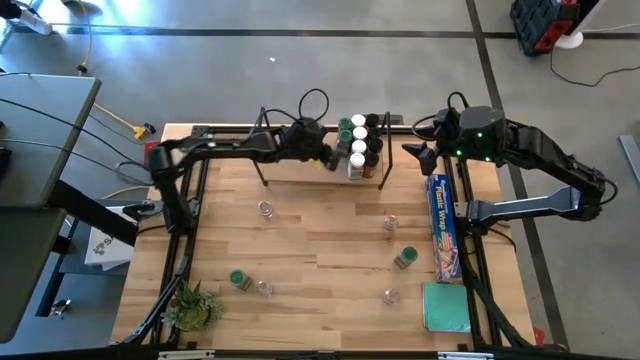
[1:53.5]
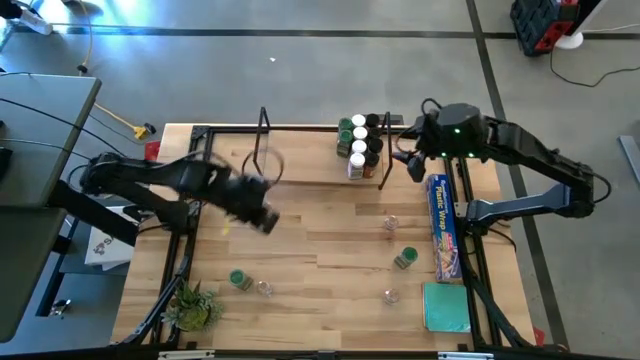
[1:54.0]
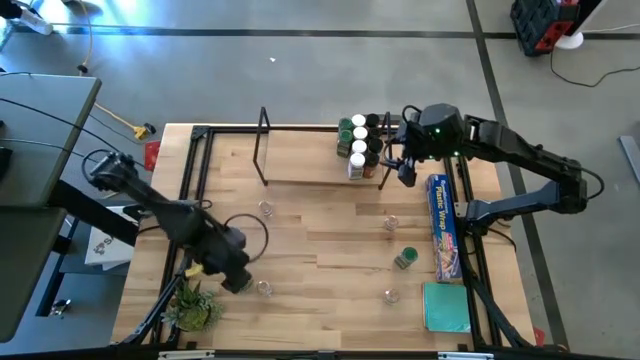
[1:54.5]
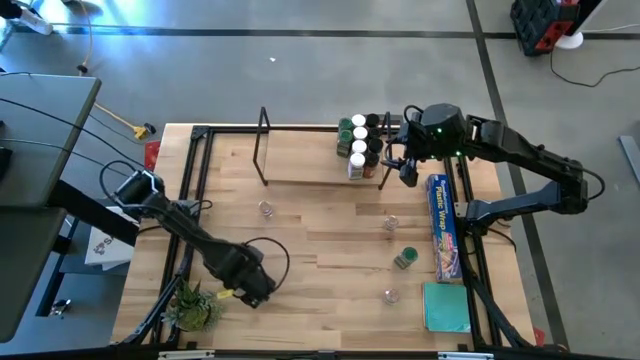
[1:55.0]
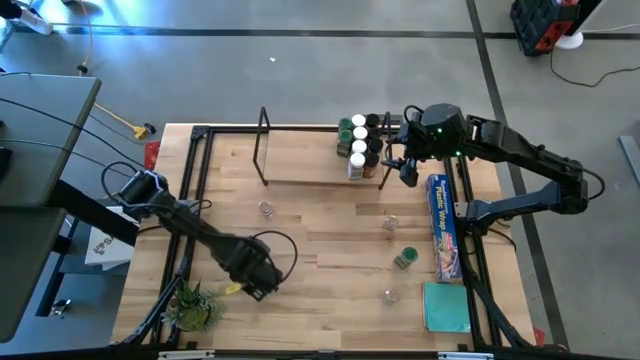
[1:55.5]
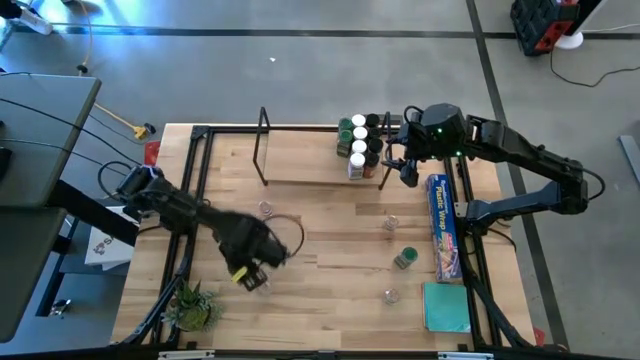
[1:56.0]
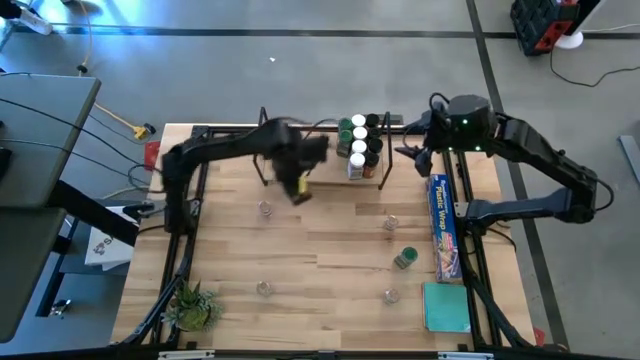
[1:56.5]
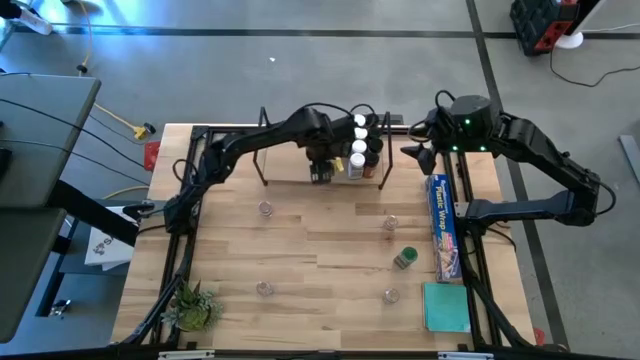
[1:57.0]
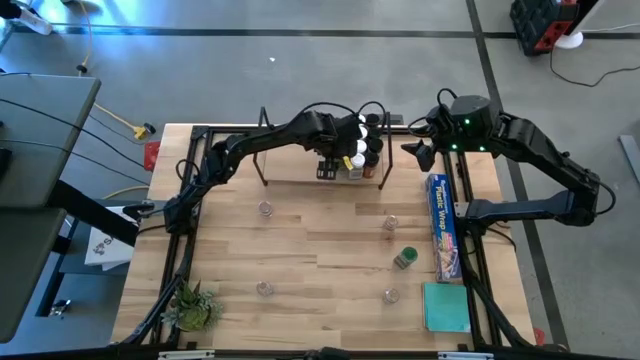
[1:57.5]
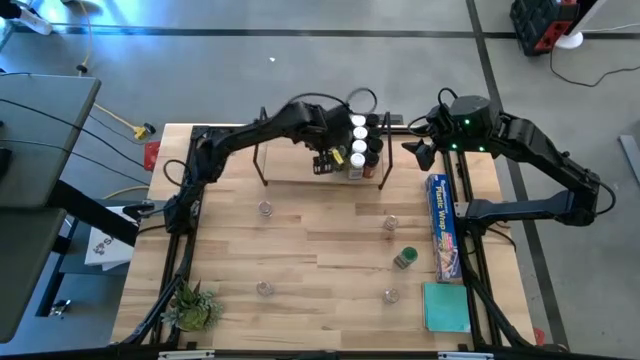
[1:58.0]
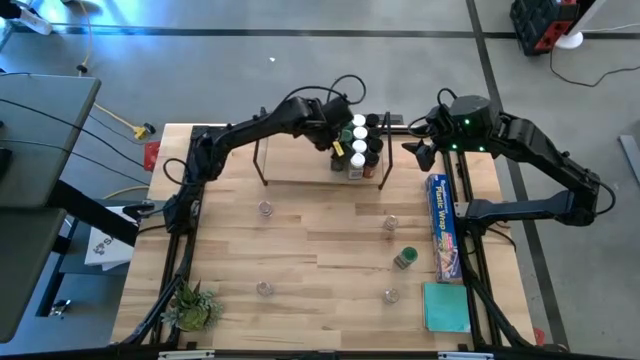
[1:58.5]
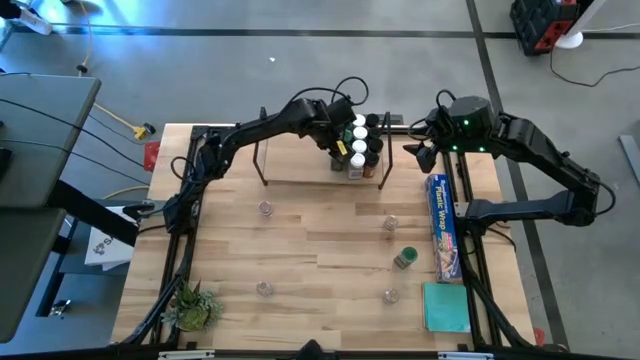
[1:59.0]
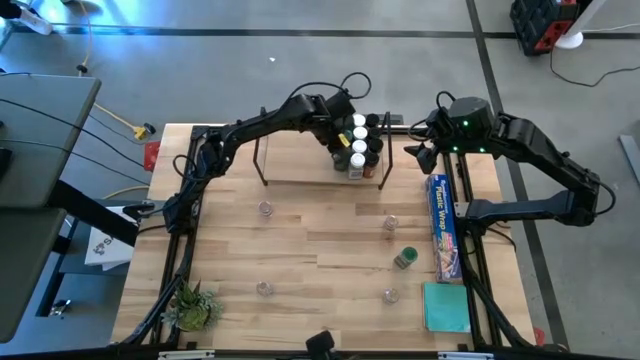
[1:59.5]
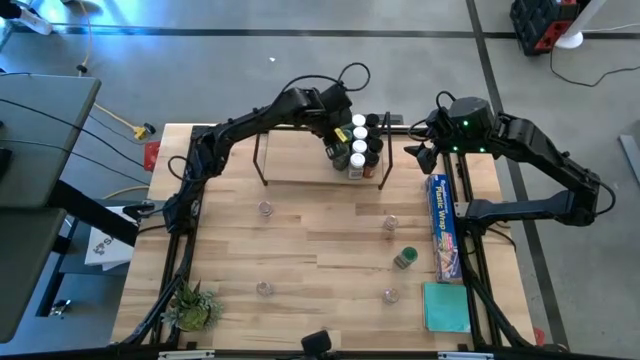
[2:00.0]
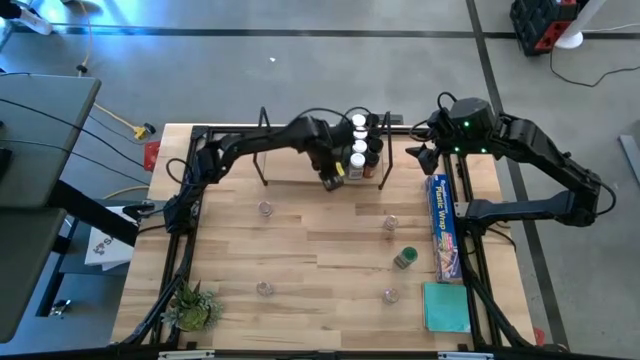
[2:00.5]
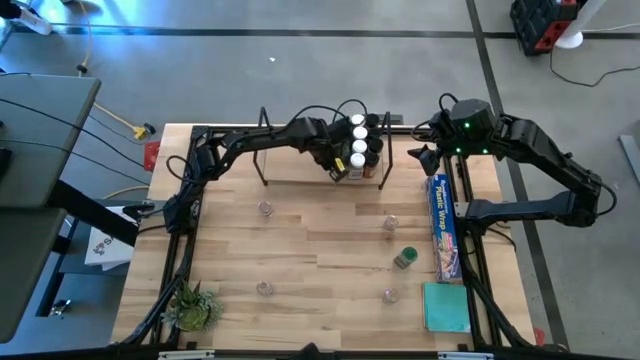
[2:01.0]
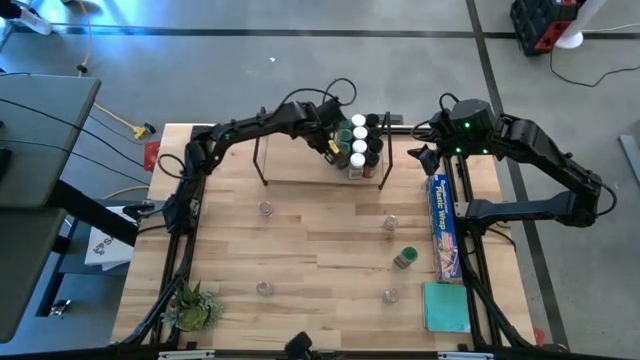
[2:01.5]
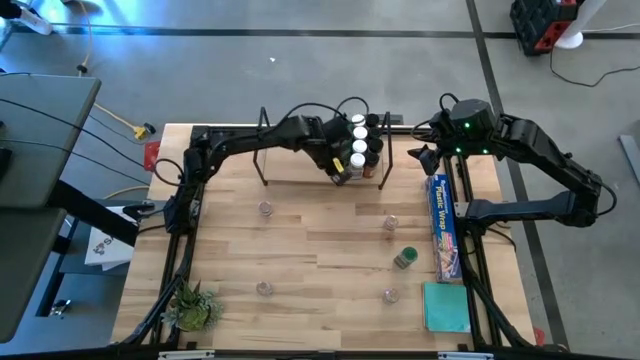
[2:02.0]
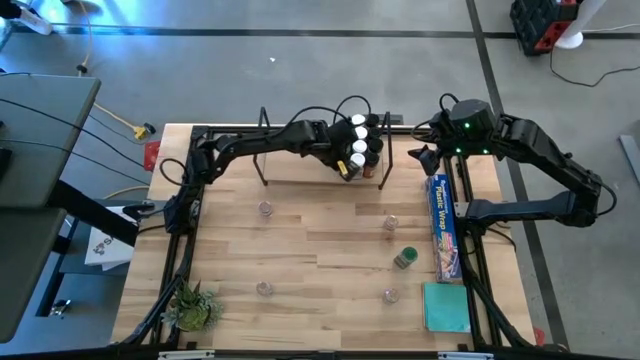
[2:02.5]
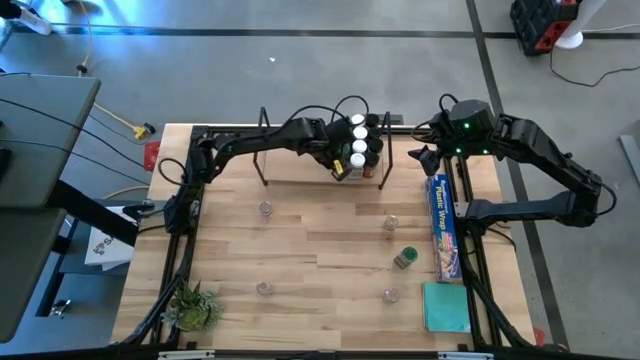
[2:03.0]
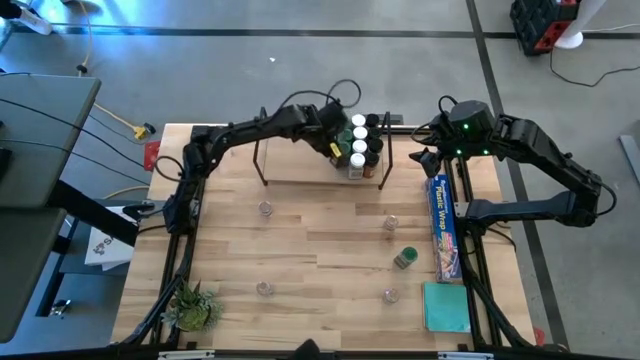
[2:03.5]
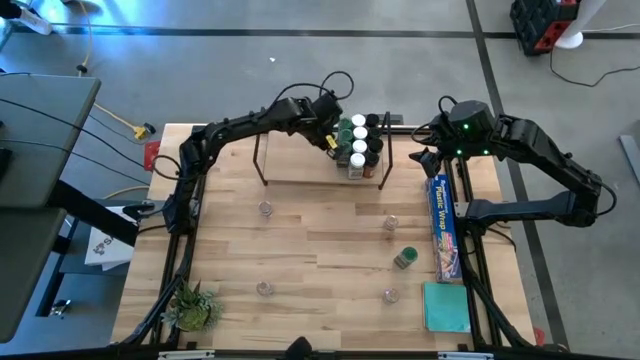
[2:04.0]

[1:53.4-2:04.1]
Task: Shelf spices
Put the green seasoning bottle on the shelf aligned with the other green seasoning bottles

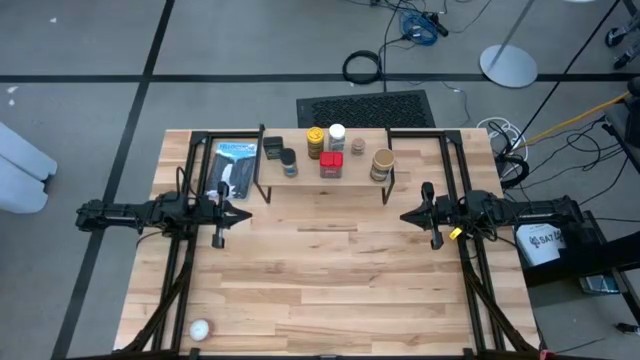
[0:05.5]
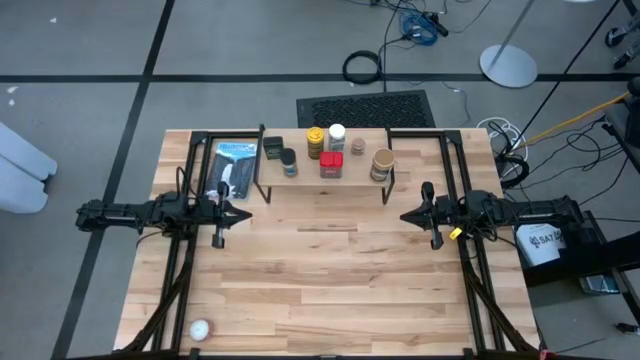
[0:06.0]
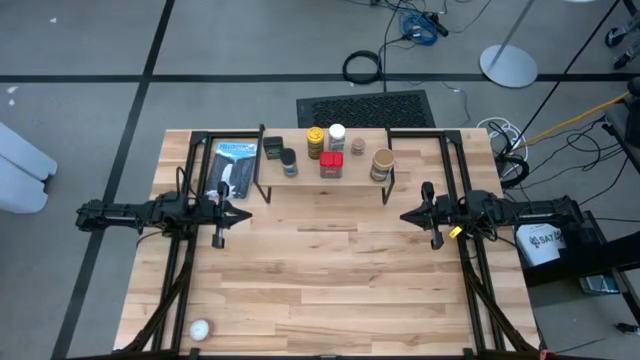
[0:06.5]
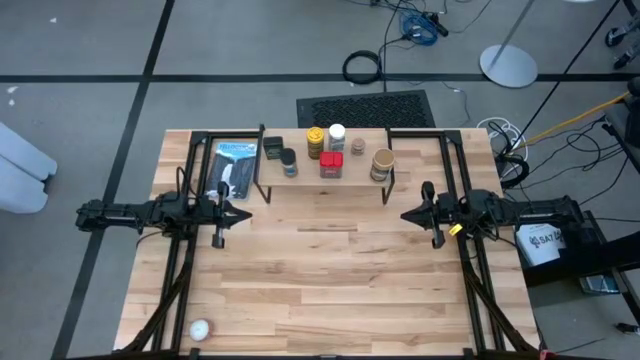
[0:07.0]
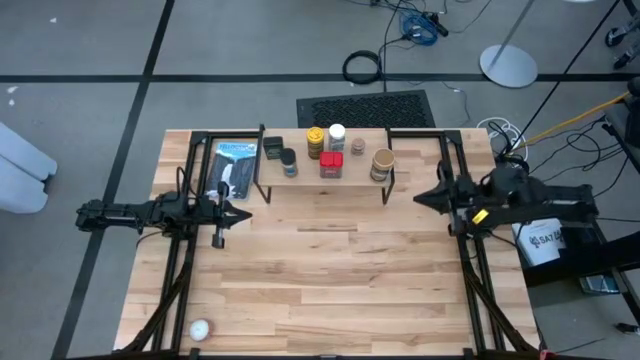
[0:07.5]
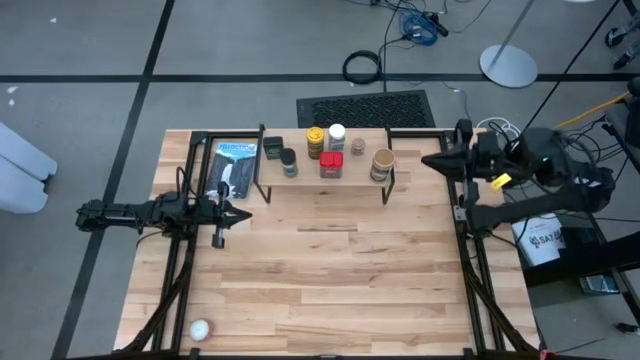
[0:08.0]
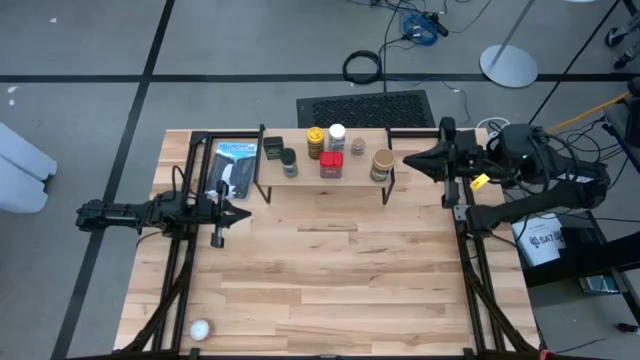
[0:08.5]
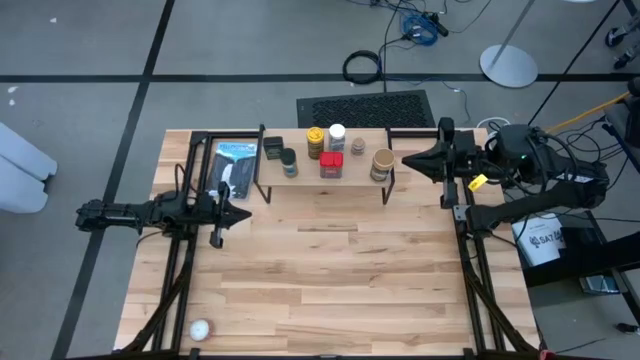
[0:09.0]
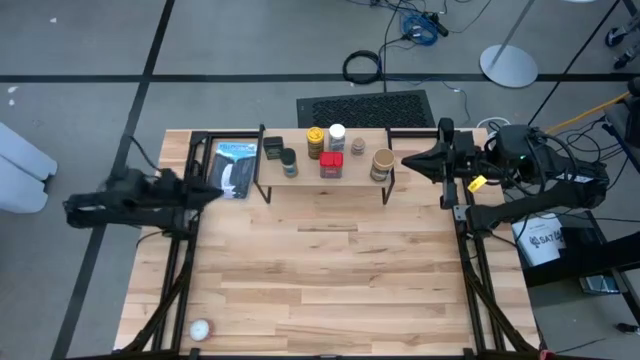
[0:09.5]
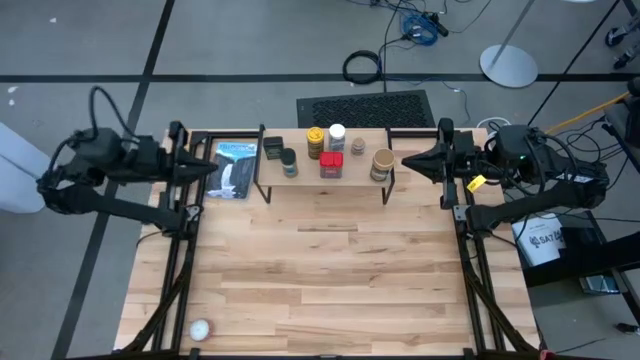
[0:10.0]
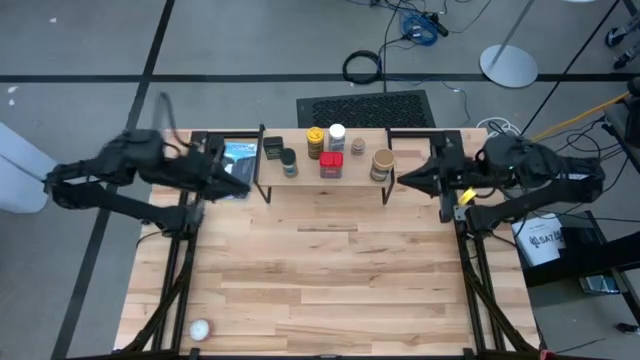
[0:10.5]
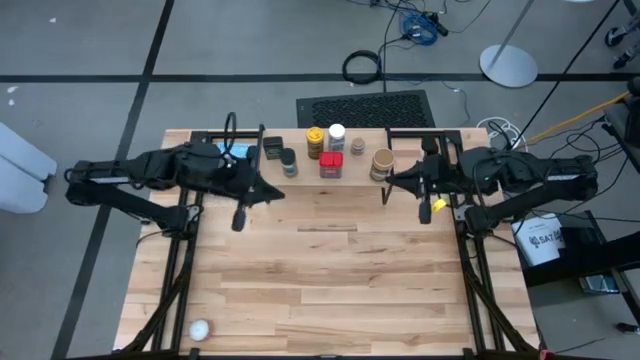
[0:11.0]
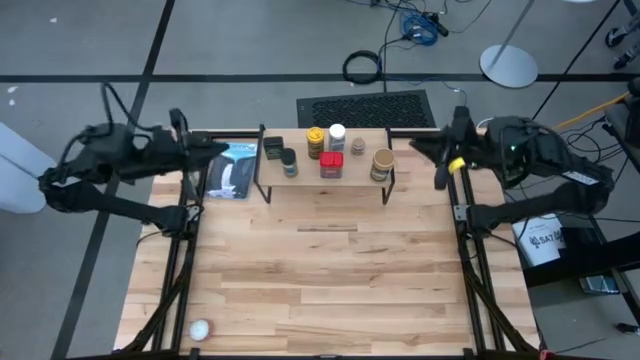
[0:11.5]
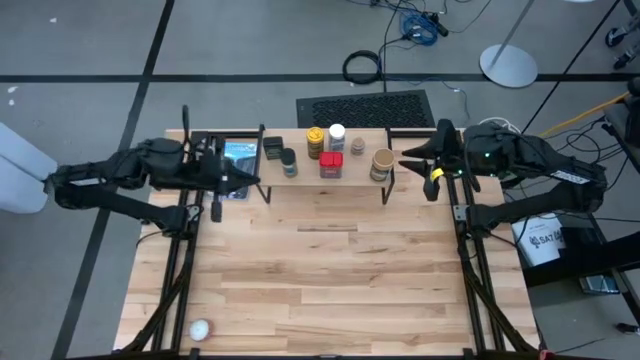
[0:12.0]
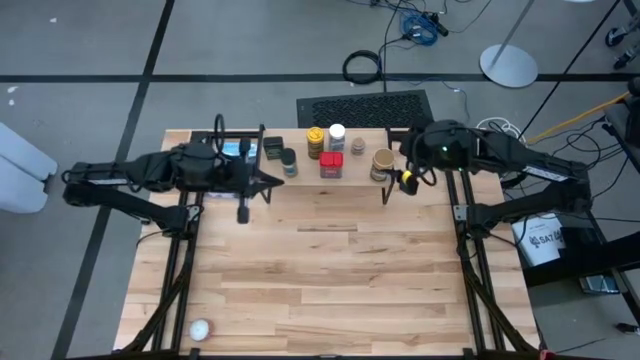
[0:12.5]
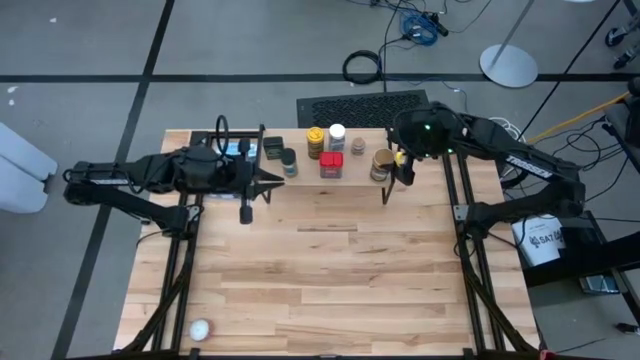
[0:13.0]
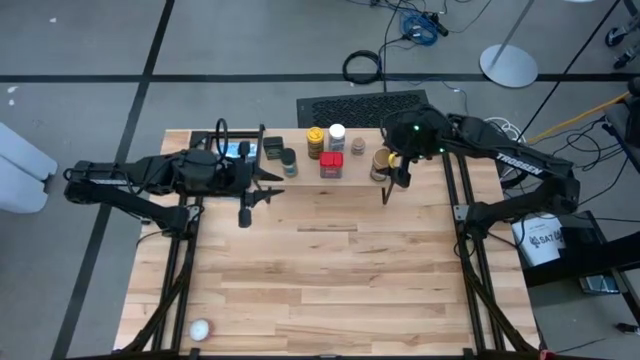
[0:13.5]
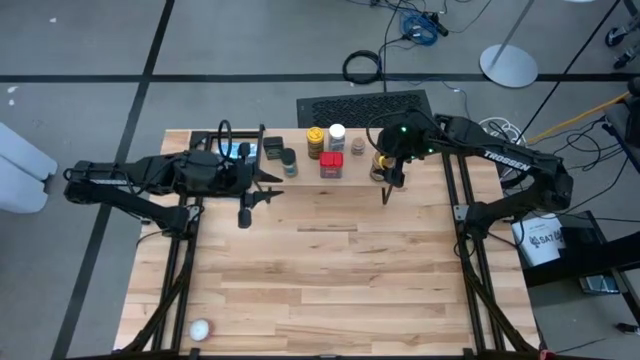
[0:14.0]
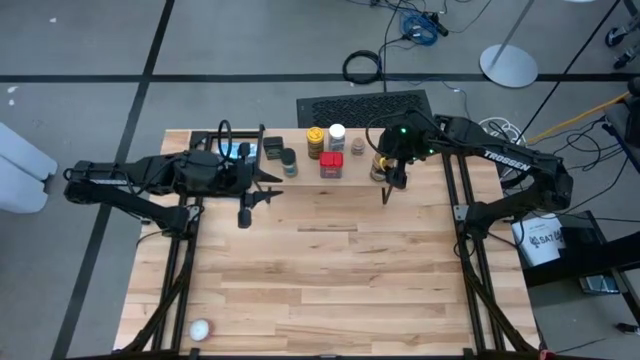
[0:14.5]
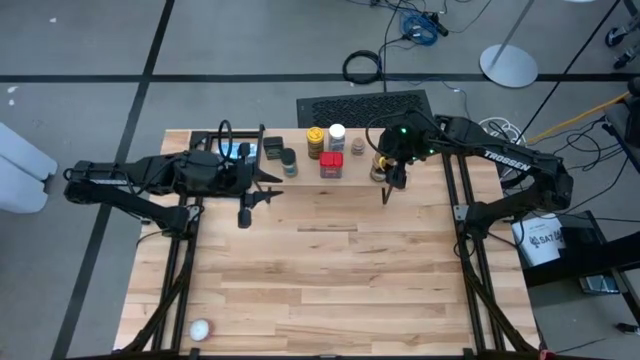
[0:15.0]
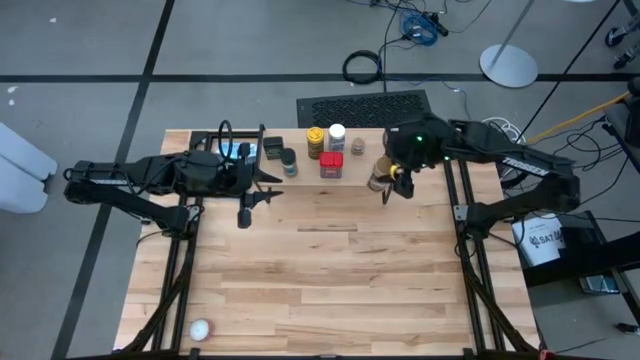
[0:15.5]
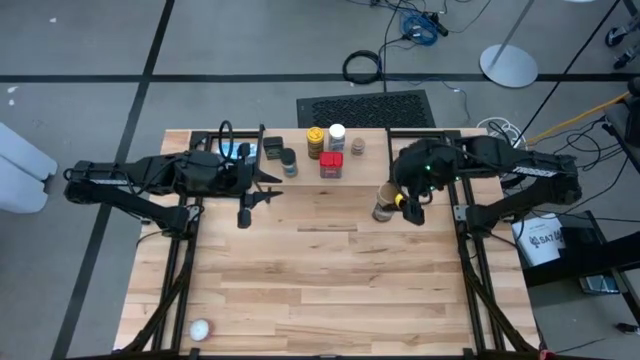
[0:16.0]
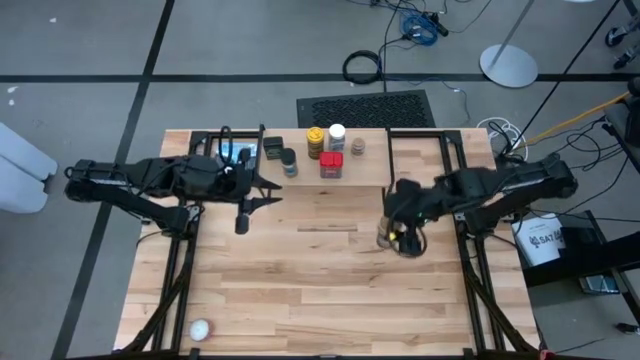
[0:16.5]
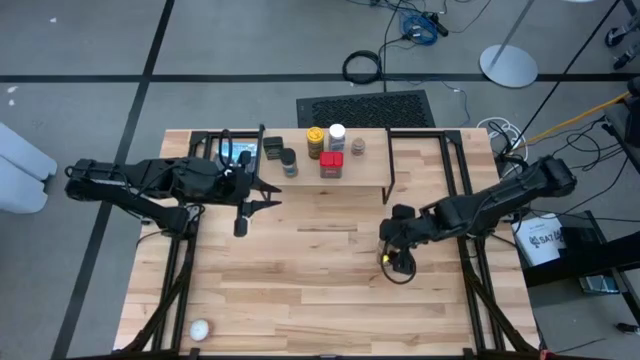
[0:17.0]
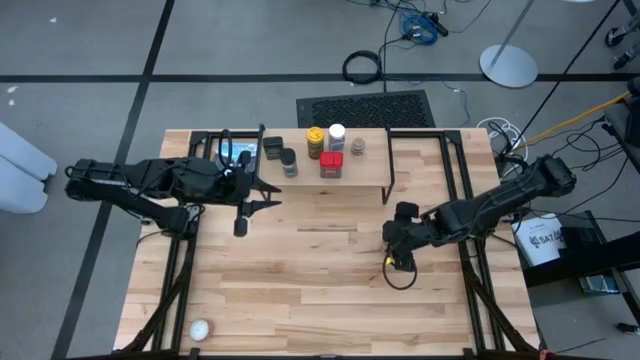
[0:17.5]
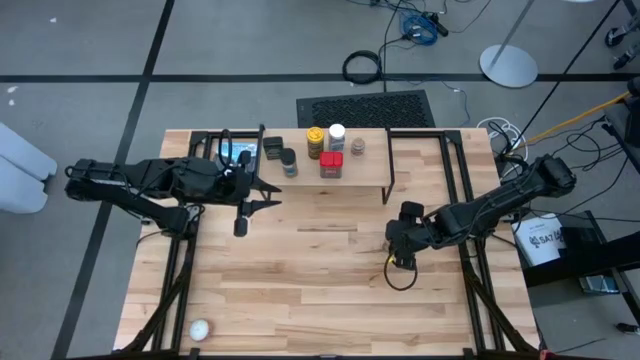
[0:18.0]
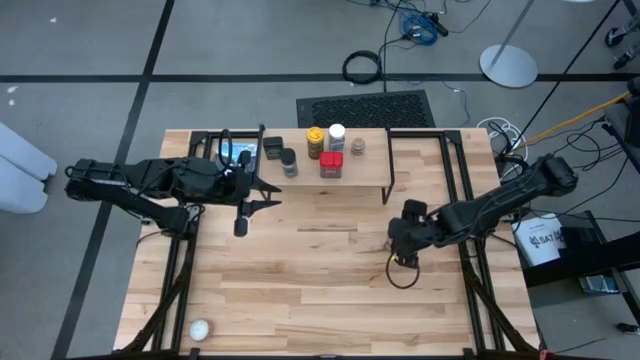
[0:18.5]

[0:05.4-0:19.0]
Task: Shelf spices
Remove the gold seasoning bottle from the shelf
